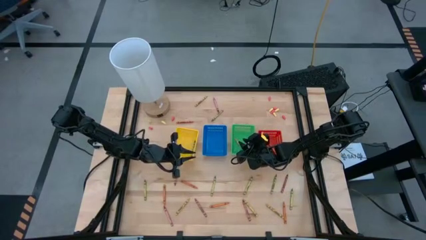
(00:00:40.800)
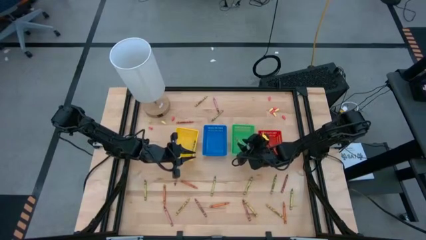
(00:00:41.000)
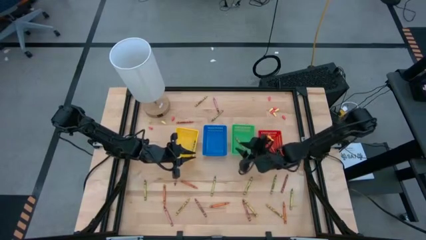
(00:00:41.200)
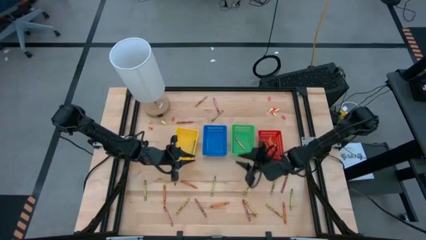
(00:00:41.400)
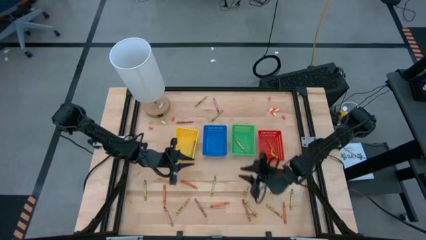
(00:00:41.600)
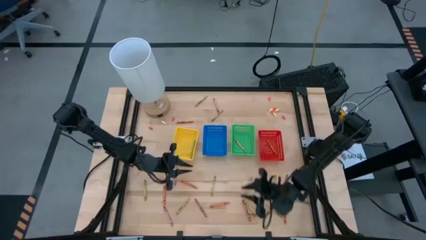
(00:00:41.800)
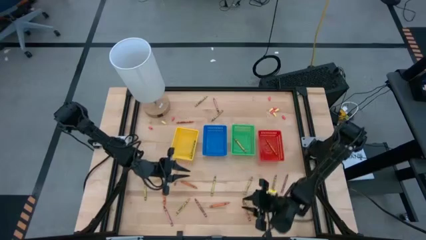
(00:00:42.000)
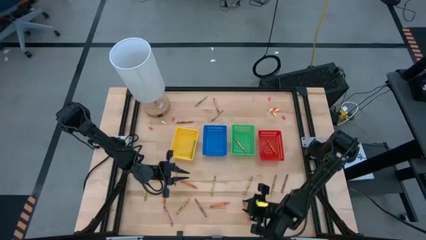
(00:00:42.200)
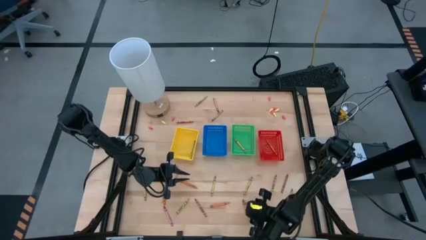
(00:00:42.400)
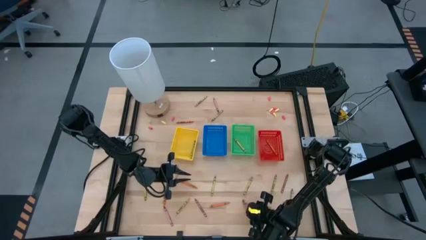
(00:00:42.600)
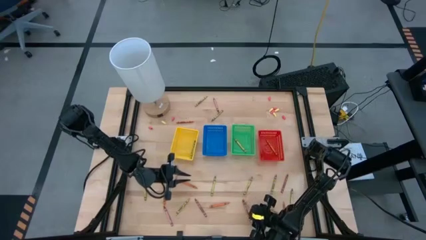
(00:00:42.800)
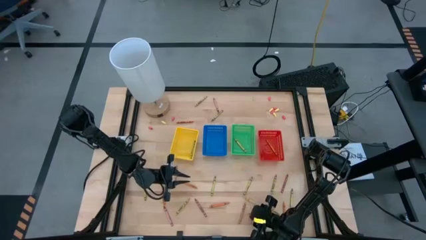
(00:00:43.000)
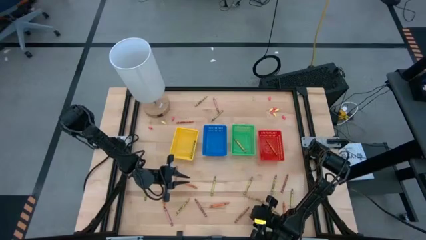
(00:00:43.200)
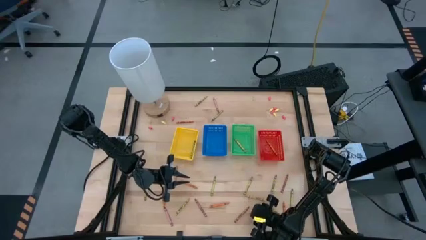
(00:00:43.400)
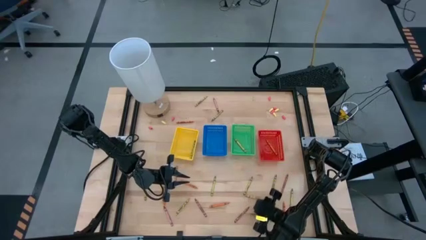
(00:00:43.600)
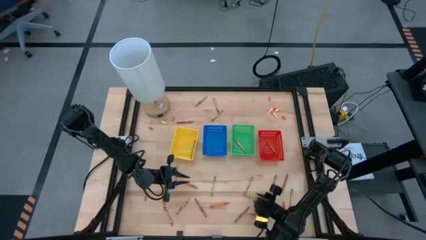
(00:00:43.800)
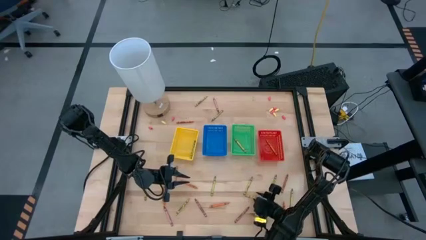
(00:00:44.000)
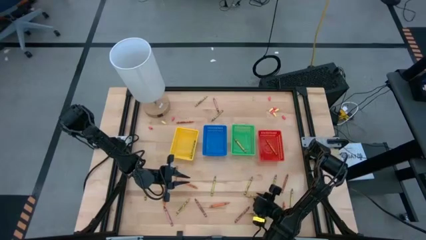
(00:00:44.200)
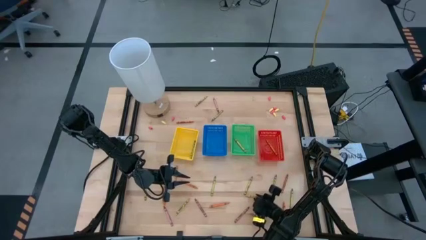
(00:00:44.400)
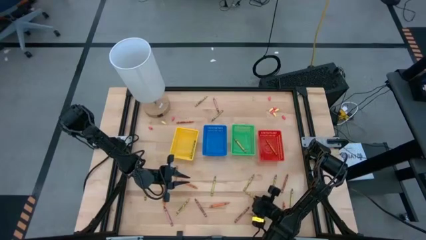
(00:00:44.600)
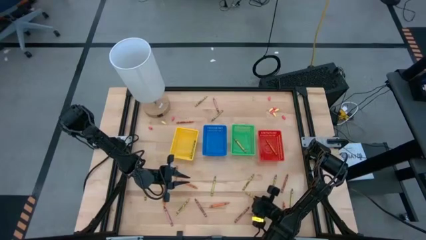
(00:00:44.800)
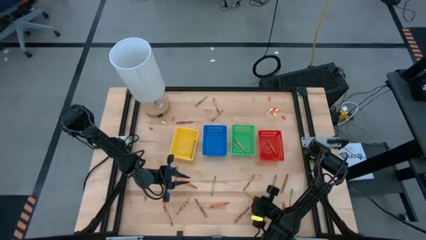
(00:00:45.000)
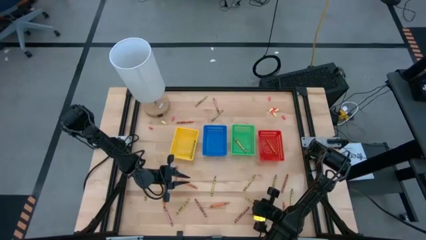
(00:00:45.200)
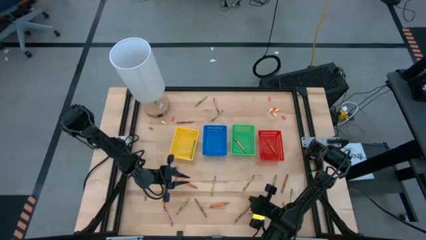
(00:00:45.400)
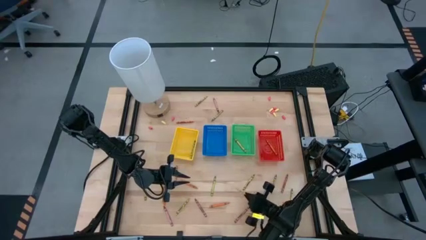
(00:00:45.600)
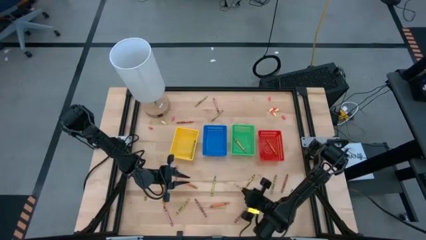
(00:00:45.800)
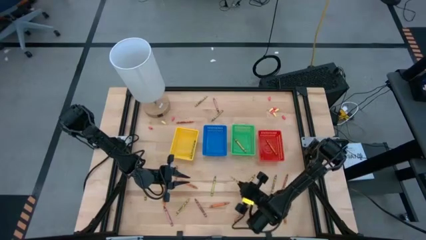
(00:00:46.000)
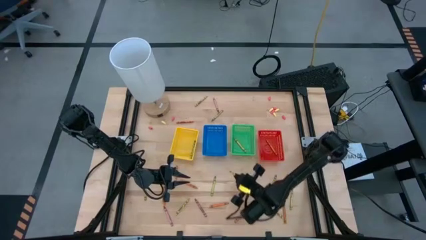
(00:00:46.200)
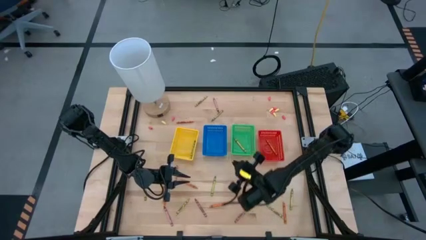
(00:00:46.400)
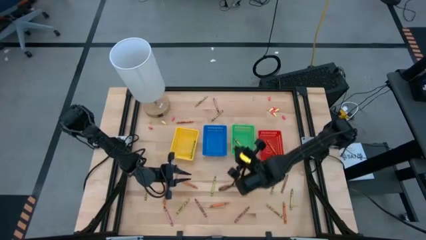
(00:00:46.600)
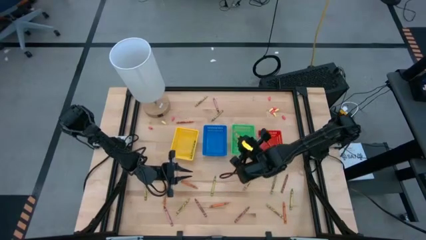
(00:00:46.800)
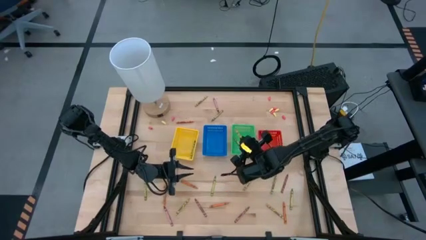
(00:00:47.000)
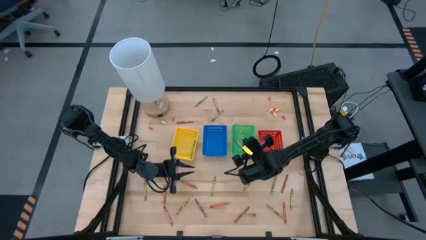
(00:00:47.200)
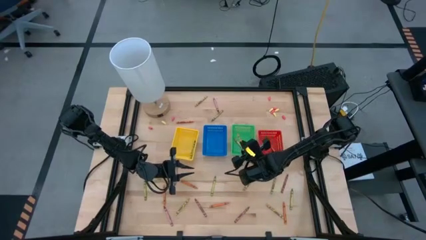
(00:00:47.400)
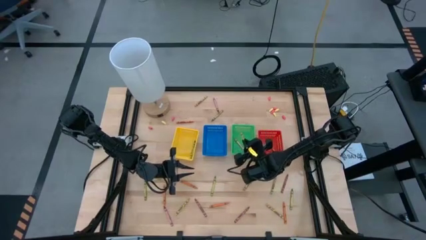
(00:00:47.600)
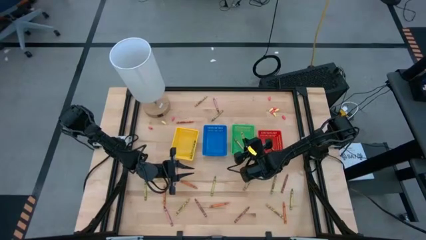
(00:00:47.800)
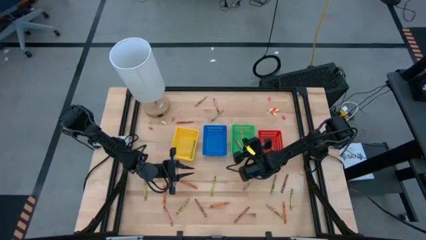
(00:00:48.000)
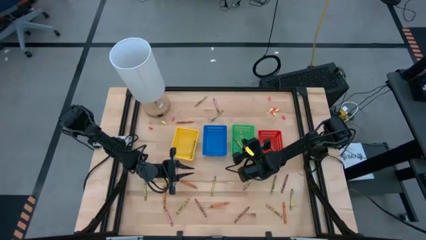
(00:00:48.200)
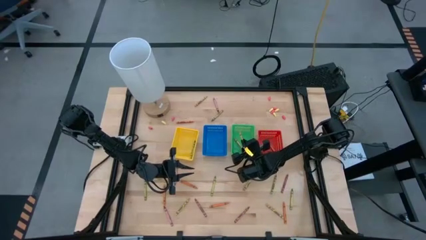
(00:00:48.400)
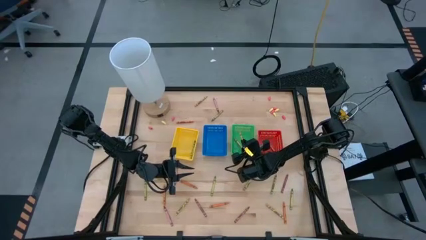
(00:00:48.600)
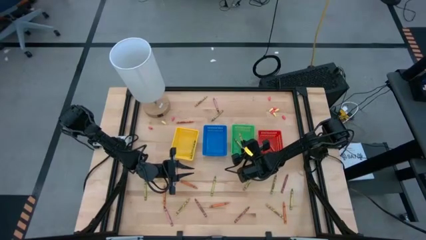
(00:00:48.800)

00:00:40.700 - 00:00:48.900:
Task: Sort crayons
Put the yellow crayon into the green bin

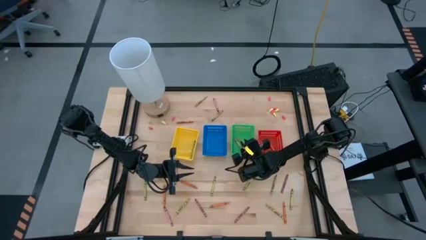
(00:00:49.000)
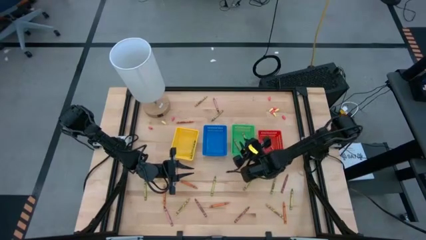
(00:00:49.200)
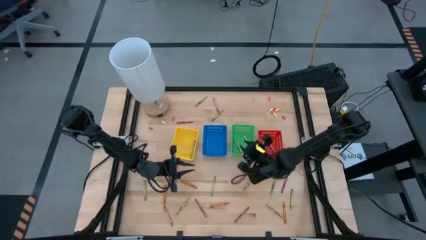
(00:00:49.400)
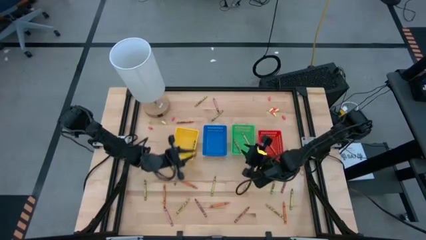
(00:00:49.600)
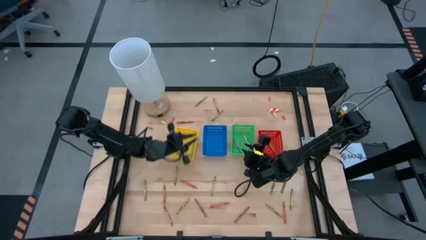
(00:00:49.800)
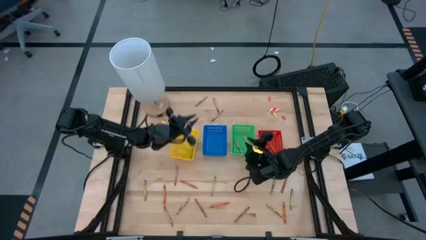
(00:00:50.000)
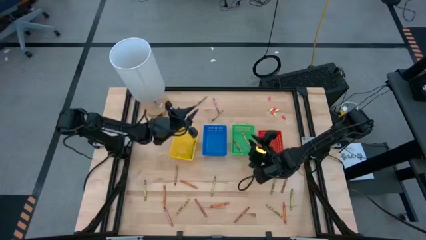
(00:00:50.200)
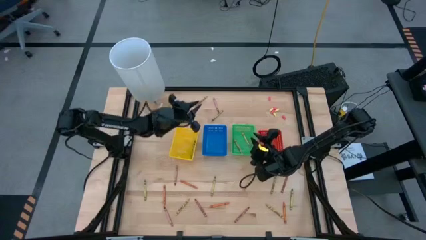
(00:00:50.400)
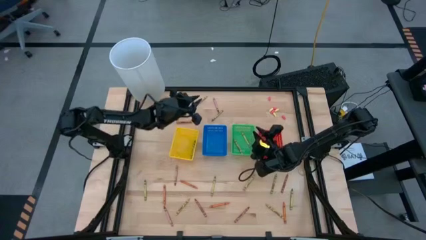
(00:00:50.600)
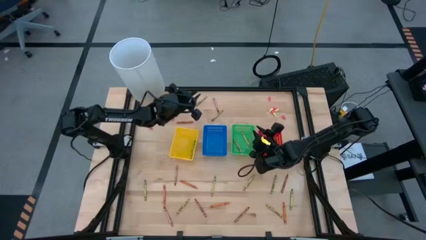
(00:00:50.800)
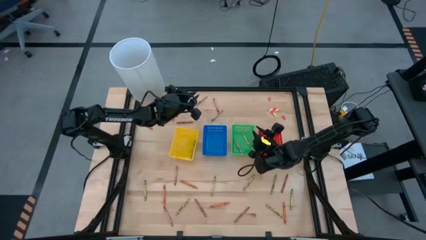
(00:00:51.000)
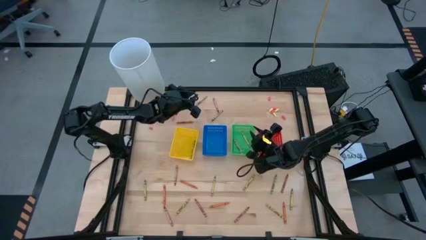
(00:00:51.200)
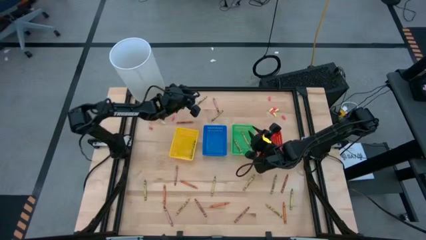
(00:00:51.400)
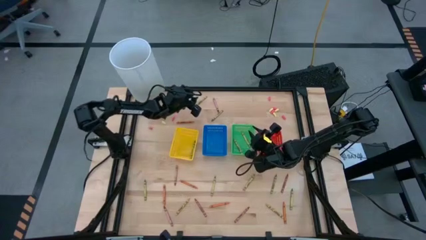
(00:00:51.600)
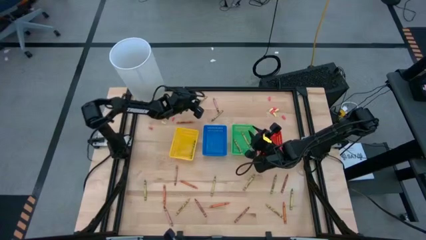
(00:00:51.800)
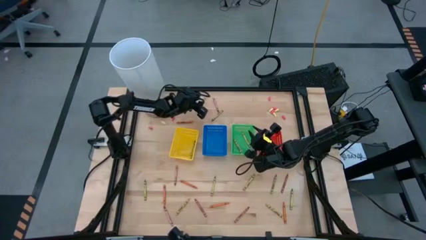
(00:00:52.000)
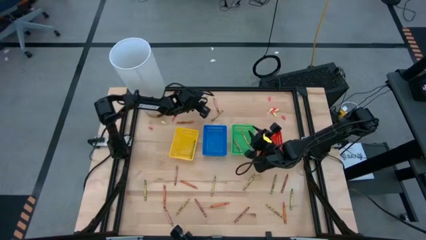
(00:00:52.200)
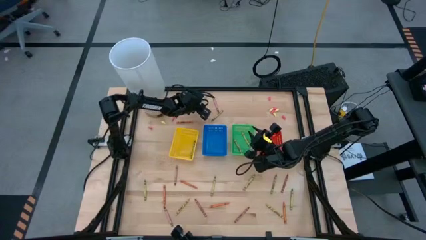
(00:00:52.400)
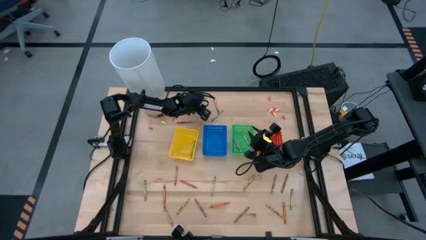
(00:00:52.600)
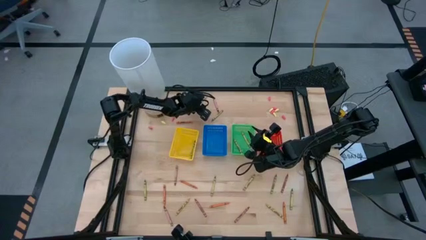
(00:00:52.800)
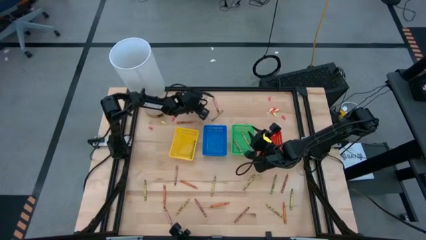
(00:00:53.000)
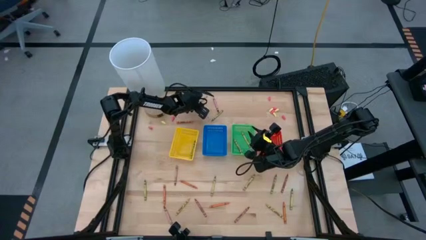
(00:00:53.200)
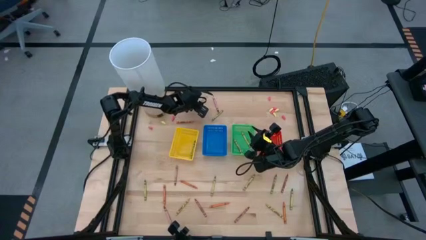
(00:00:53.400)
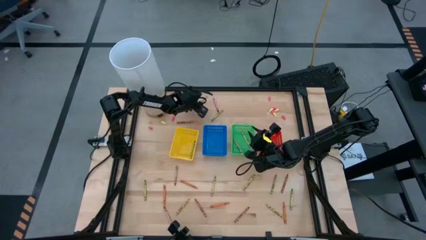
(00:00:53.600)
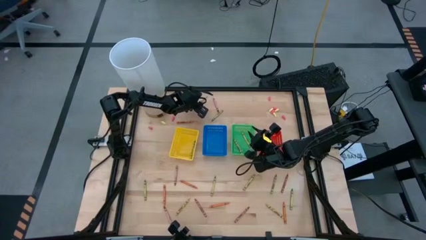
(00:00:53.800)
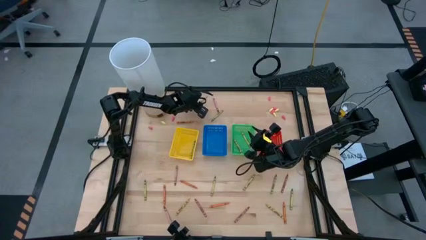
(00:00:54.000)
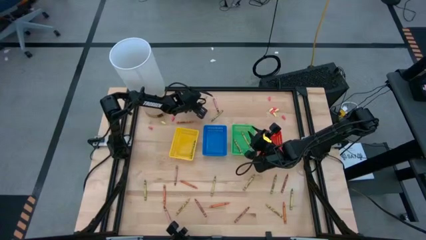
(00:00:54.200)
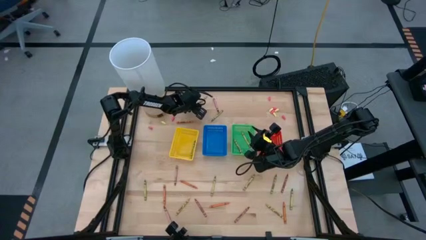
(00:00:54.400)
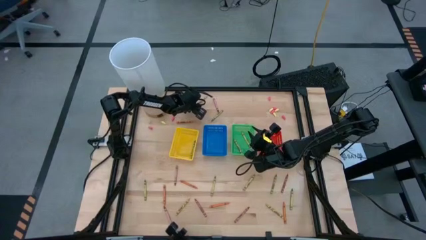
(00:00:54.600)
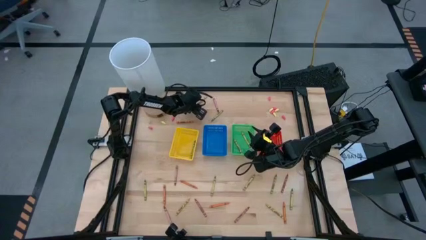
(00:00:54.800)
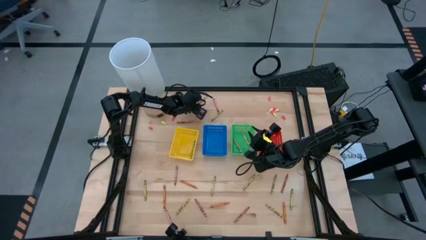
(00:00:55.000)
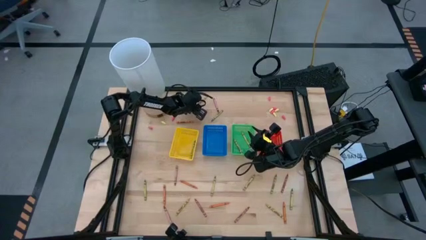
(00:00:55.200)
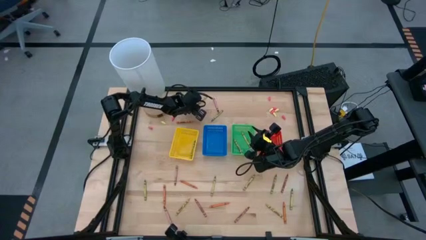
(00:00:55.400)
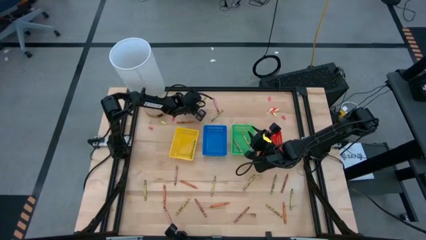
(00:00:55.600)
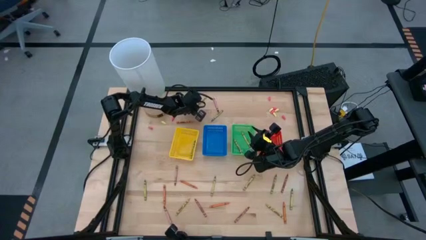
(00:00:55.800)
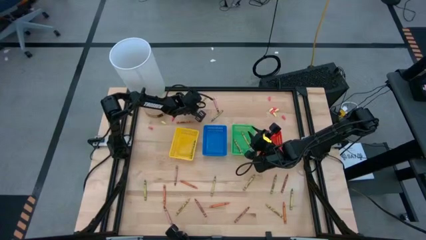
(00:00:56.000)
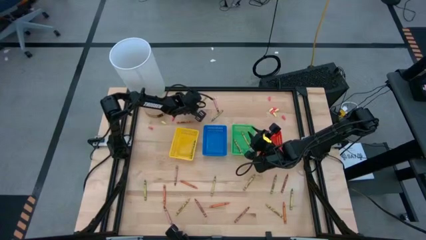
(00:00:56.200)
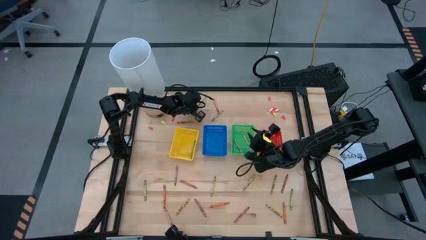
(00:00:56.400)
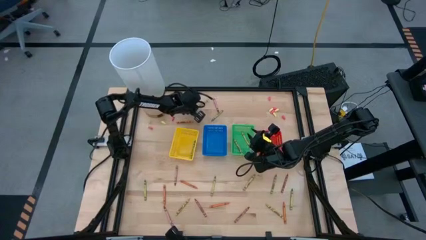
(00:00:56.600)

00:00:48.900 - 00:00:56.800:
Put the yellow crayon into the green bin
